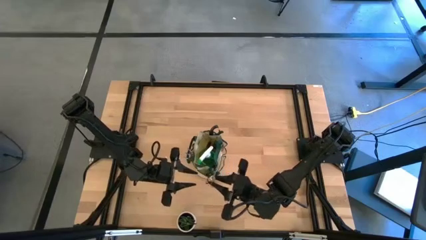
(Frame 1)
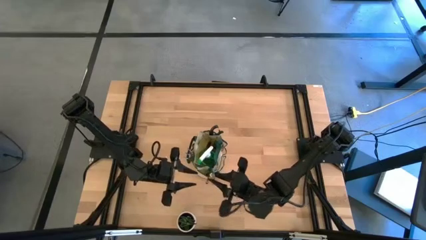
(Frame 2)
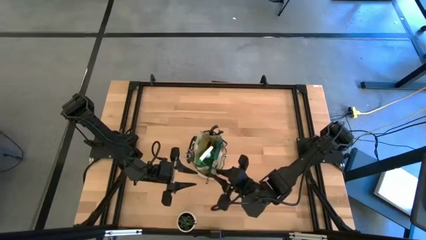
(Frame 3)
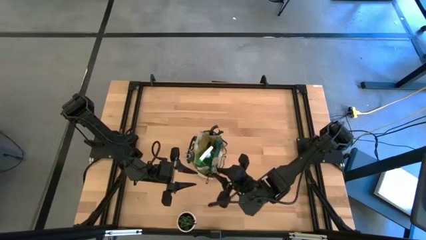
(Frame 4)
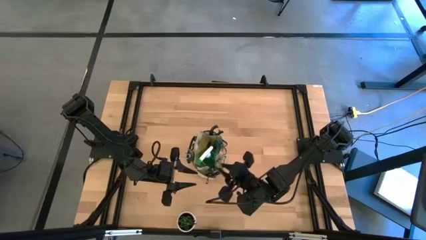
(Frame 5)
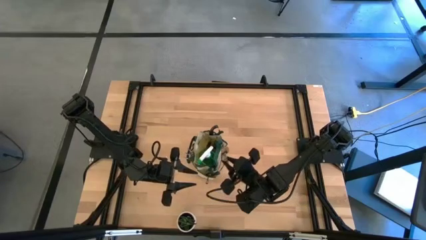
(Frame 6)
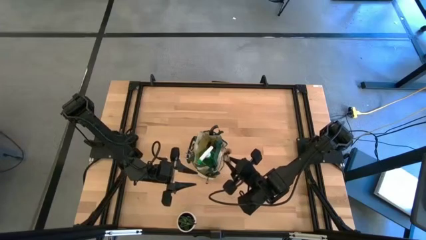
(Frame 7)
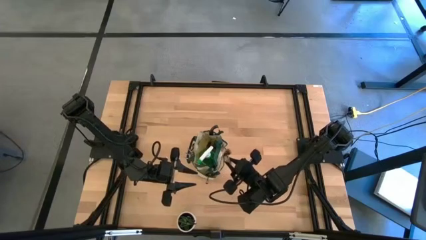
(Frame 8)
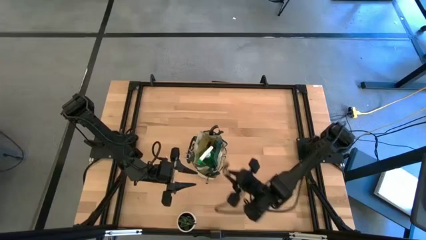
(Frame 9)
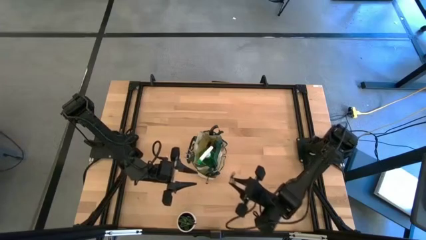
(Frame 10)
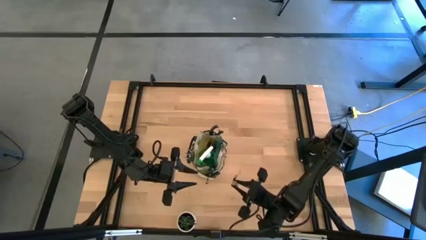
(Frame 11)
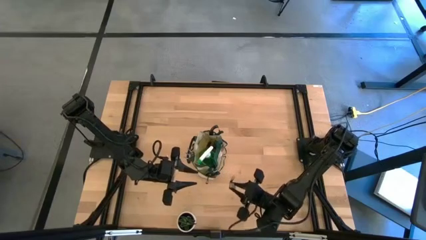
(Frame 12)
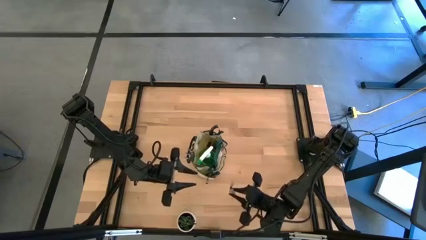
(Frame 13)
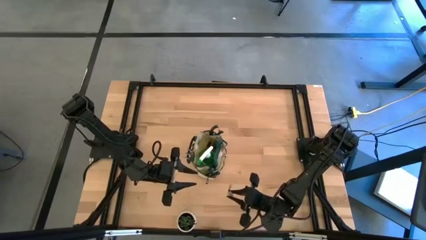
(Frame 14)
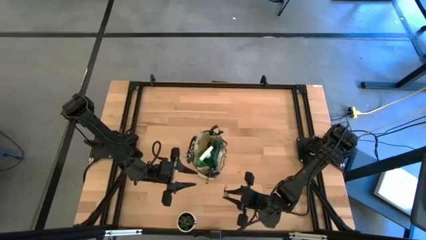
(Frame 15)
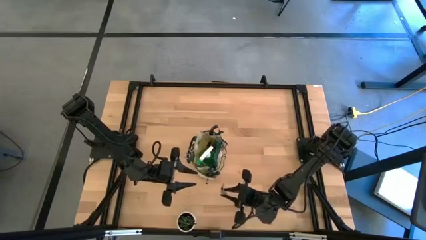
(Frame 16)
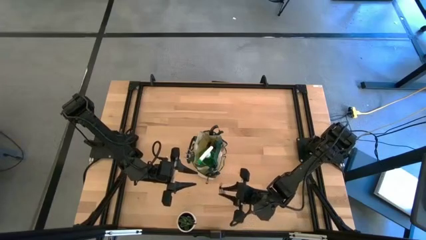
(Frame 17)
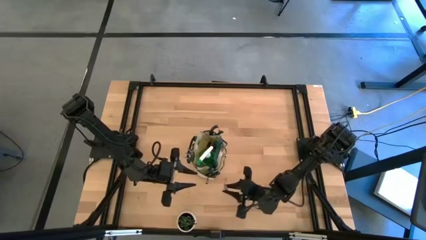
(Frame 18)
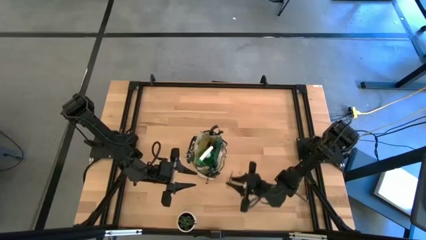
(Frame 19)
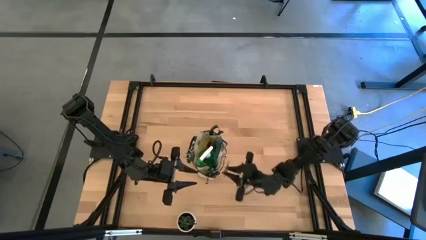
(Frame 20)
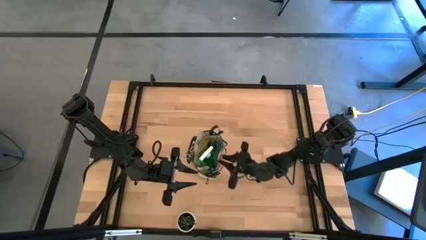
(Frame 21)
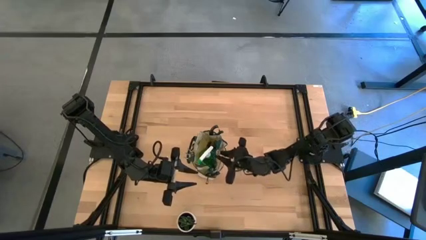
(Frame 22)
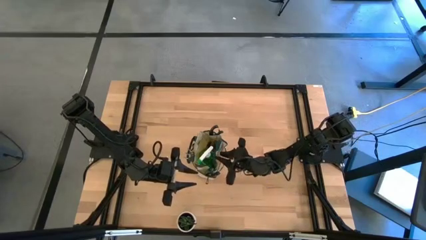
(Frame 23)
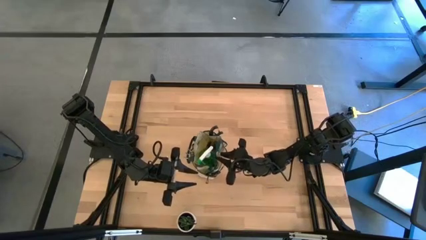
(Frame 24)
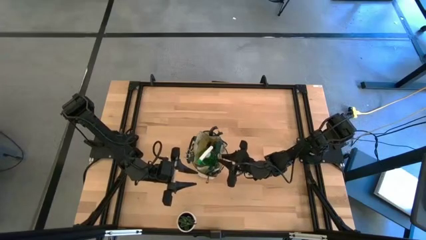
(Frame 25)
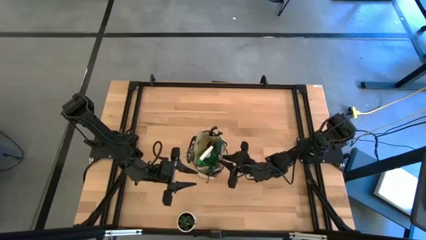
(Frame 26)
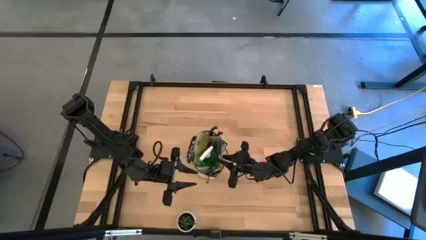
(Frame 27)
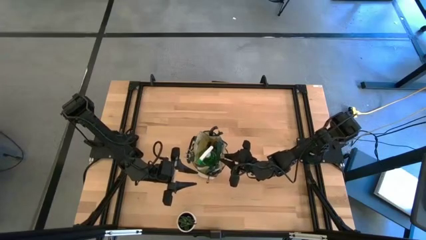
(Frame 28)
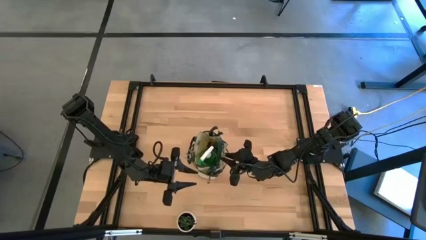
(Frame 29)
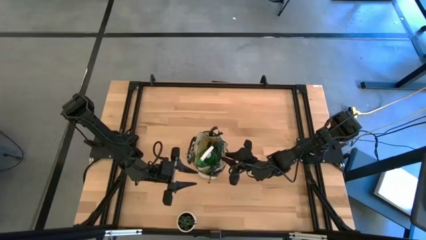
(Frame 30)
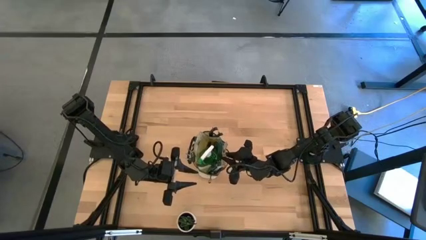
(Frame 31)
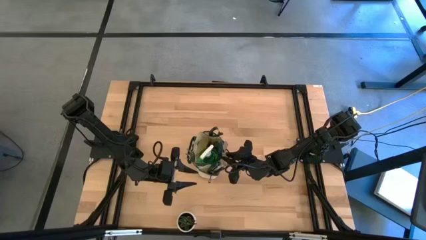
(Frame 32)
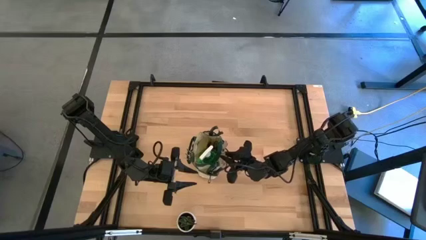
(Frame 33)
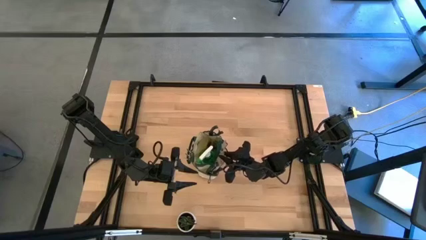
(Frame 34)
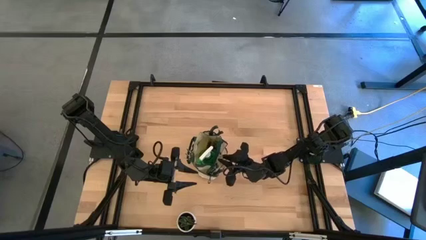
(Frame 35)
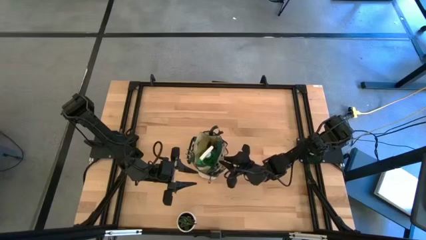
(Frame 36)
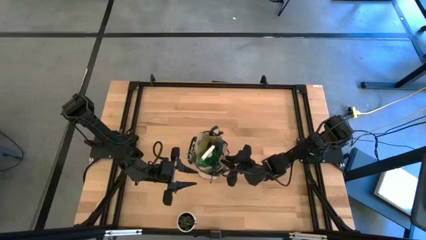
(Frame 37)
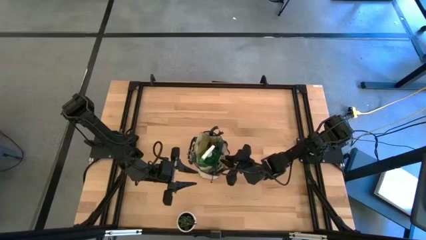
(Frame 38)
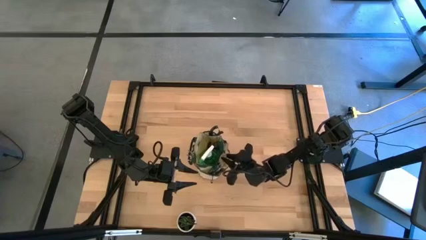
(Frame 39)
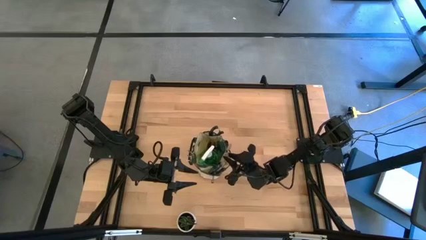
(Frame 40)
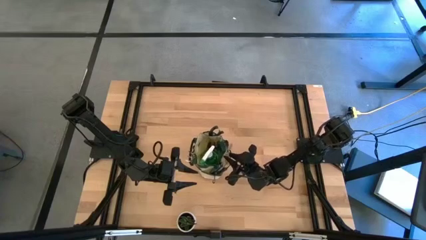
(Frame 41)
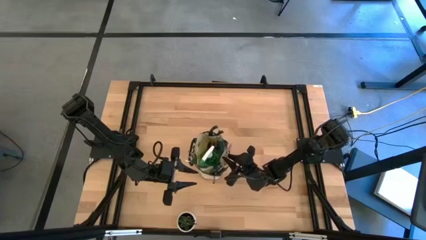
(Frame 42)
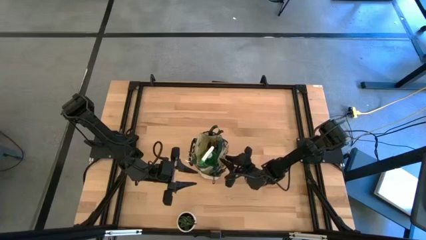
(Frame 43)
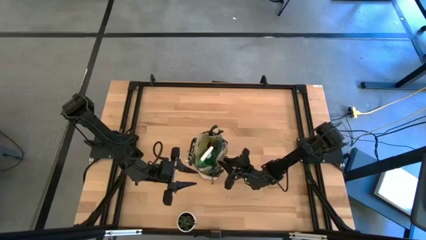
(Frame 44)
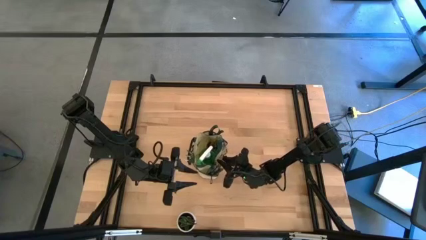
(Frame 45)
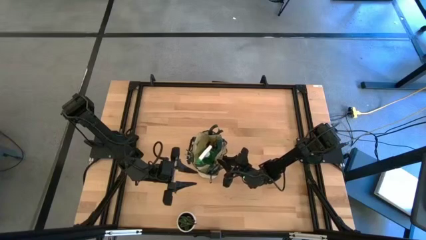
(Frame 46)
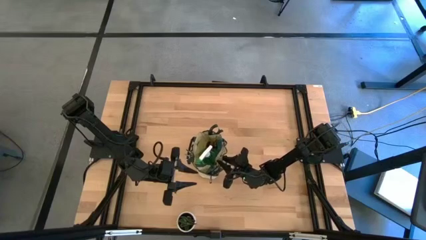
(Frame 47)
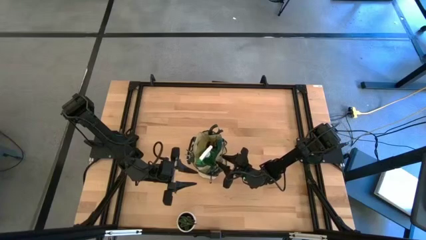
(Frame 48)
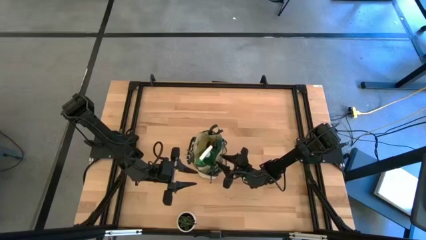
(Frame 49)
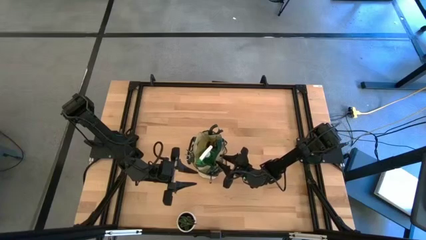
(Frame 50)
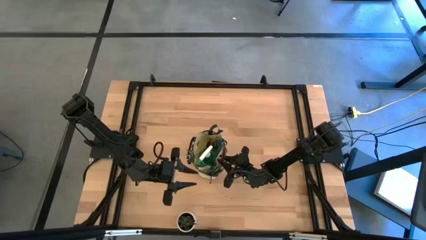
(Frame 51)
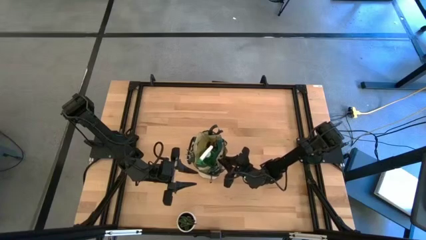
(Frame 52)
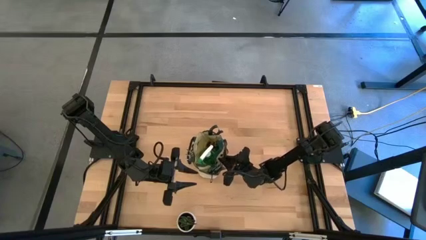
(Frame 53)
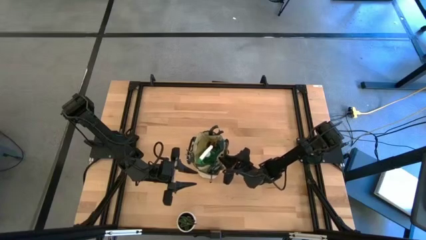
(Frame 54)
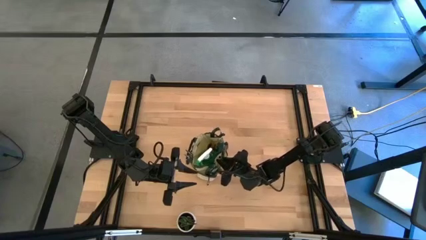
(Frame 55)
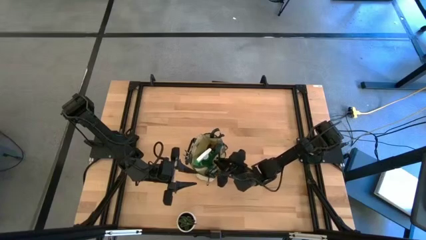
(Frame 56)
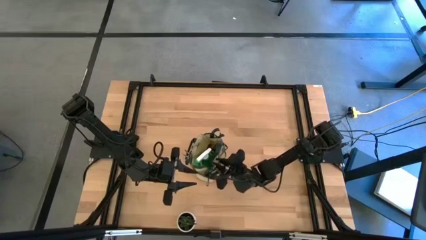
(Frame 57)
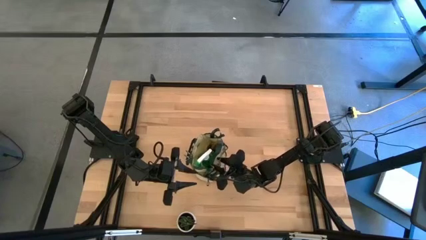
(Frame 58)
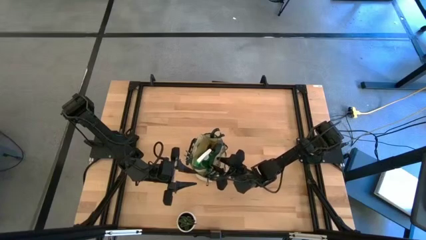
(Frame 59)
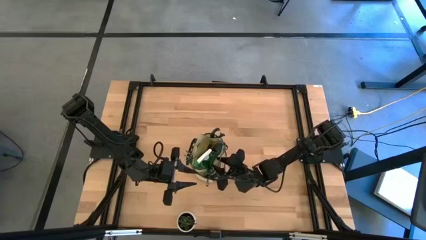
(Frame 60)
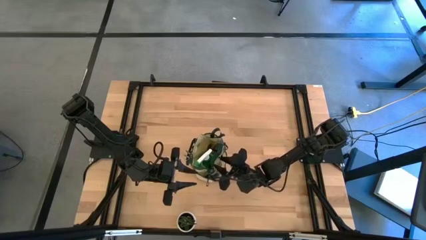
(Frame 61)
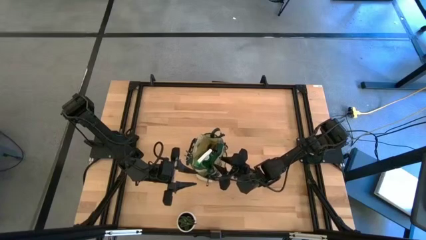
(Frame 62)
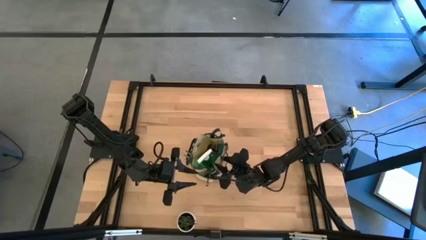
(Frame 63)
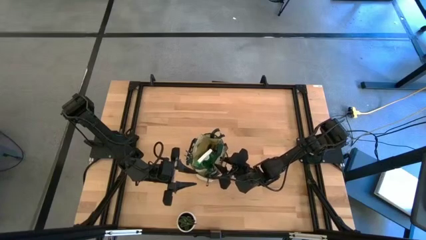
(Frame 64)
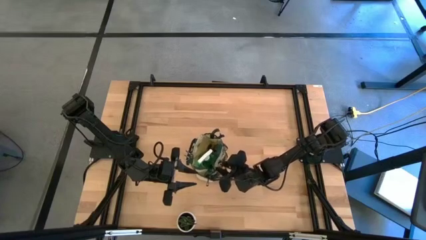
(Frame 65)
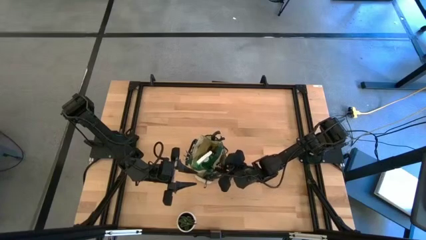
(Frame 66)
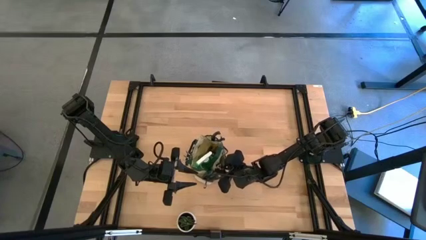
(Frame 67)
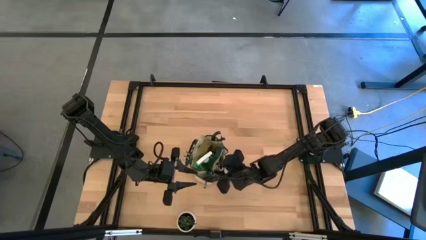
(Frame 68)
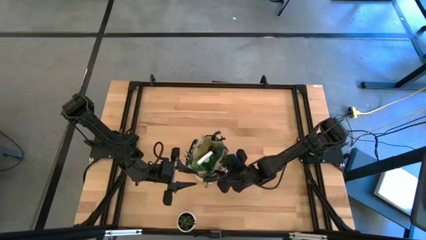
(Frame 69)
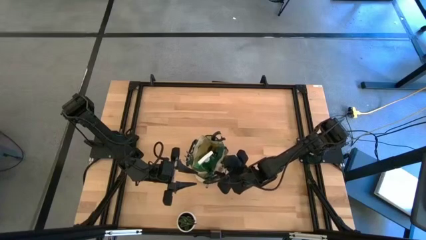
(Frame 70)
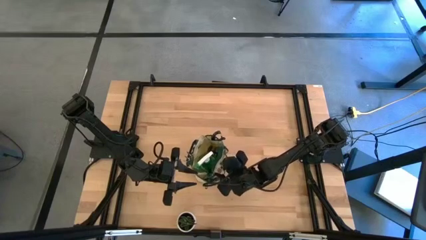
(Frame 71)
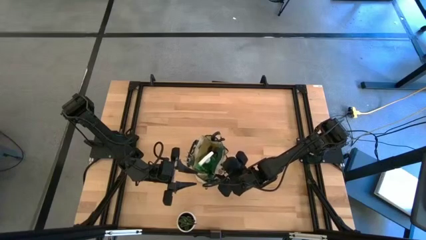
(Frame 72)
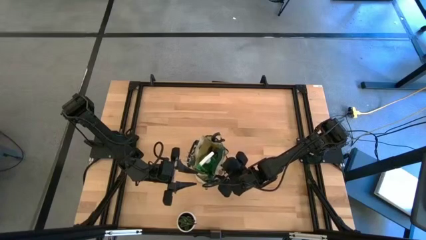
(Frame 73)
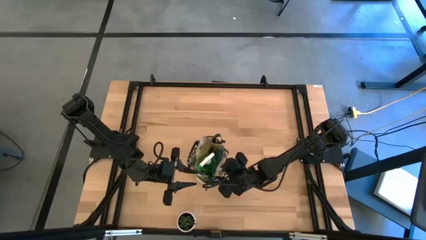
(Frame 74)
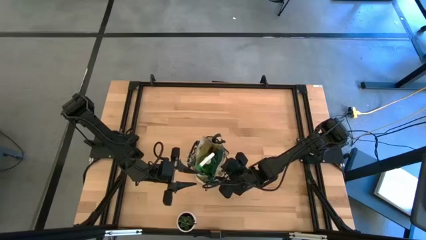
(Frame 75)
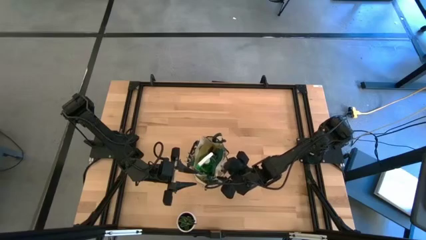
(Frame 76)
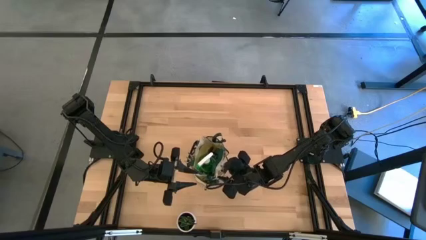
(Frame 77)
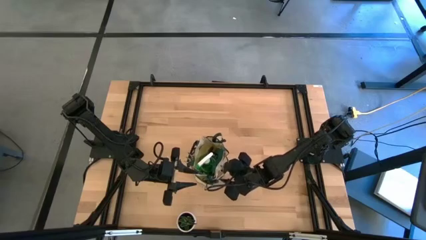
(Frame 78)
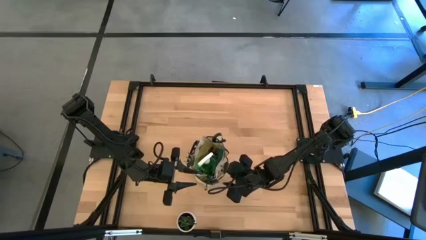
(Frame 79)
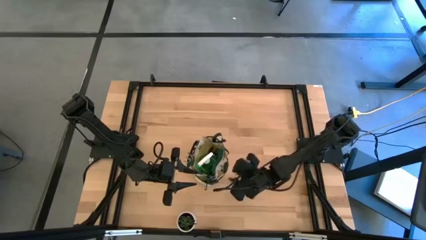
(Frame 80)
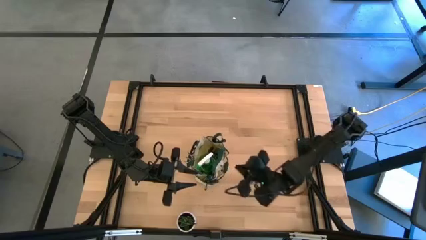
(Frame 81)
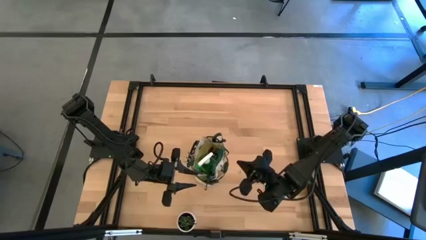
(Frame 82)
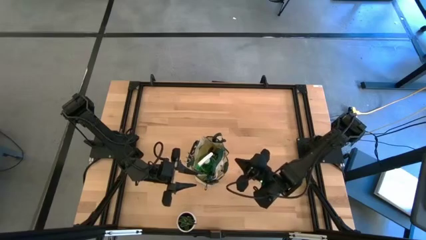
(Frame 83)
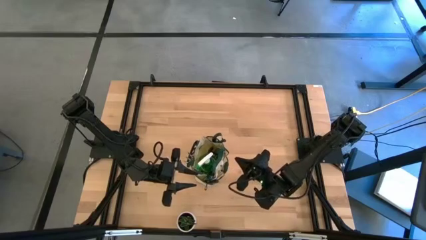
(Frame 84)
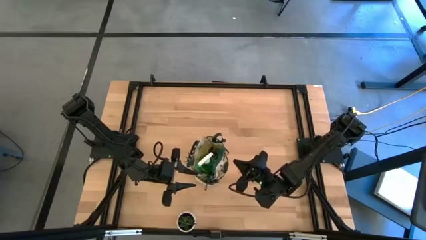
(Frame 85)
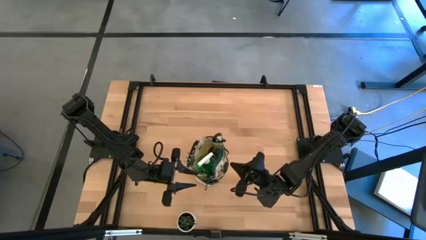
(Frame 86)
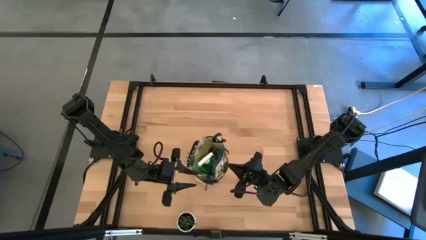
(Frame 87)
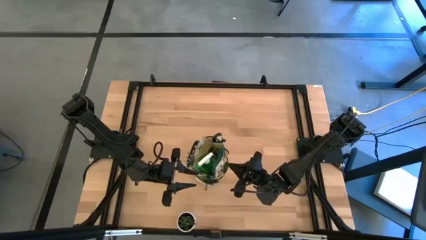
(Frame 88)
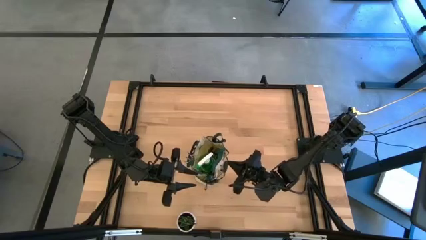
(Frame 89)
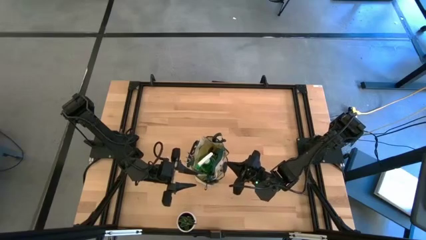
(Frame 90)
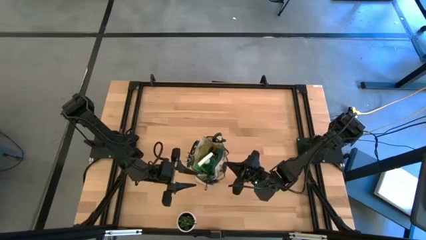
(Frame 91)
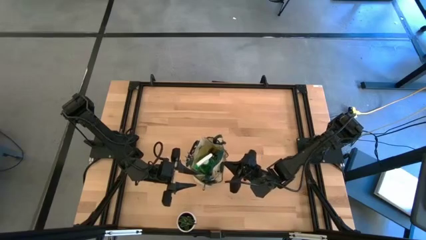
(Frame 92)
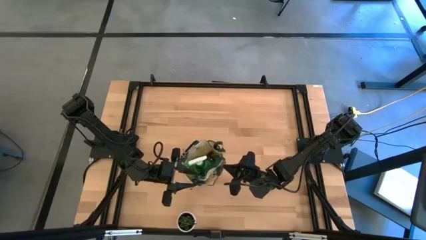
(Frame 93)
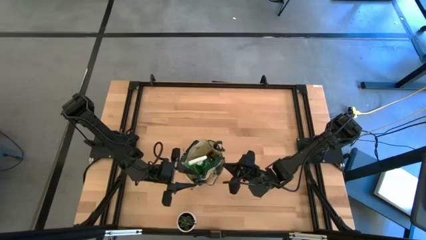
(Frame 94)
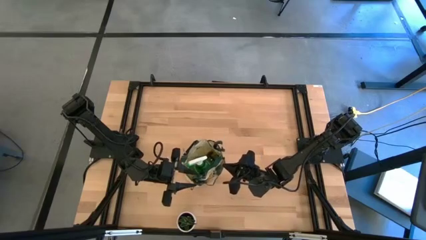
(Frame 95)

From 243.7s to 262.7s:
Task: Pick & Place Garden tools in Gardening bag
Put the brown trowel into the side pocket of the green gardening bag
